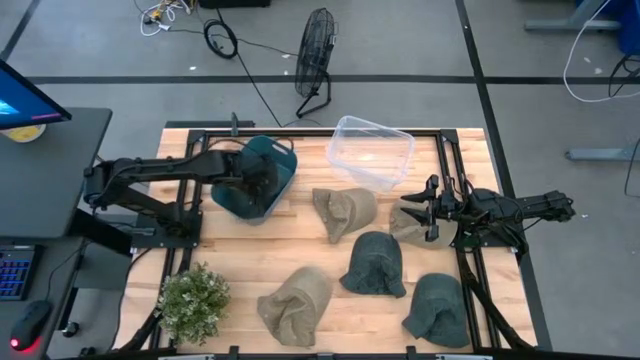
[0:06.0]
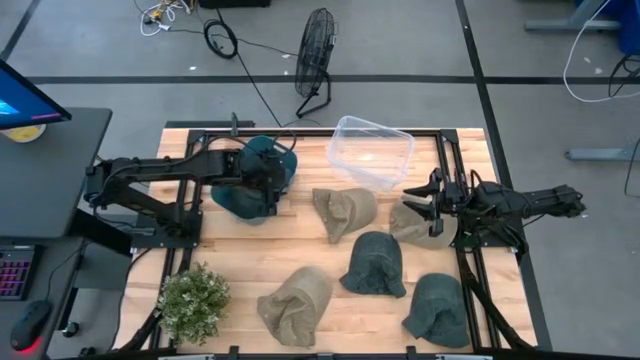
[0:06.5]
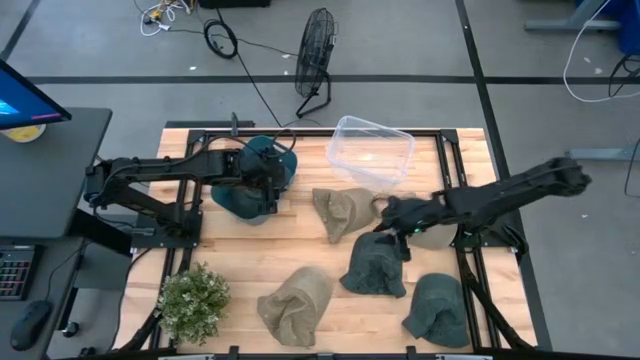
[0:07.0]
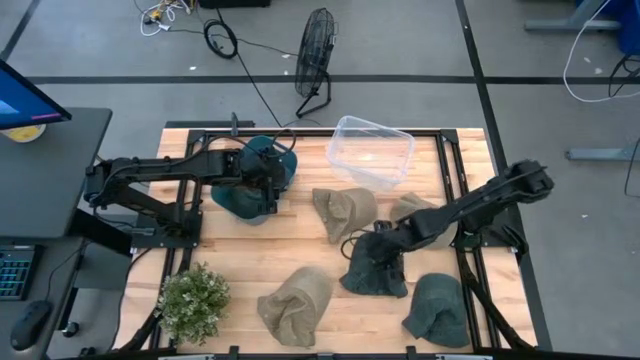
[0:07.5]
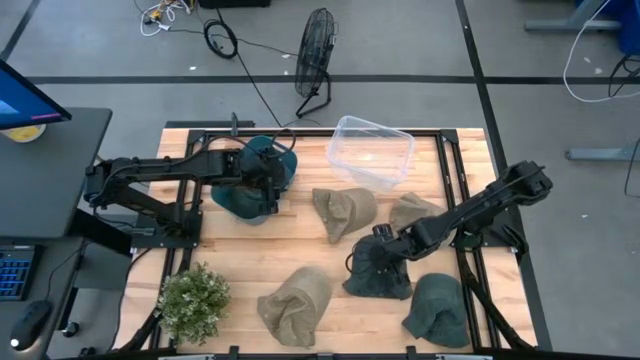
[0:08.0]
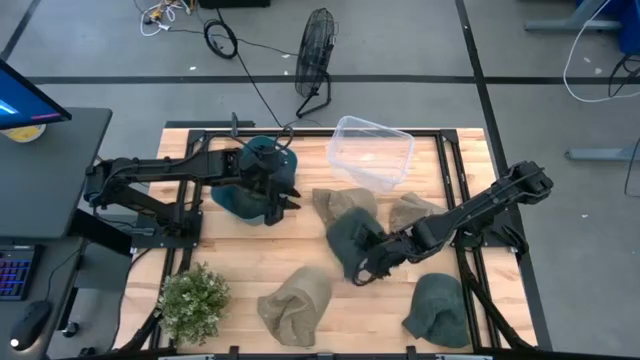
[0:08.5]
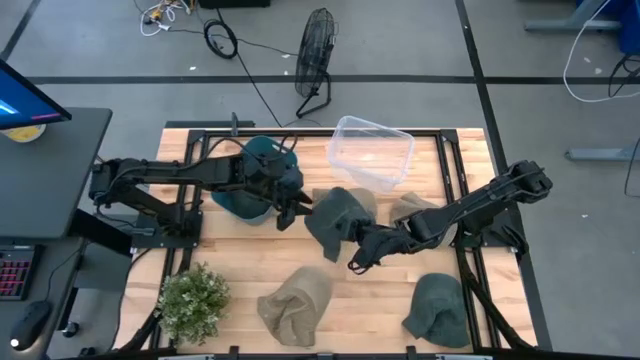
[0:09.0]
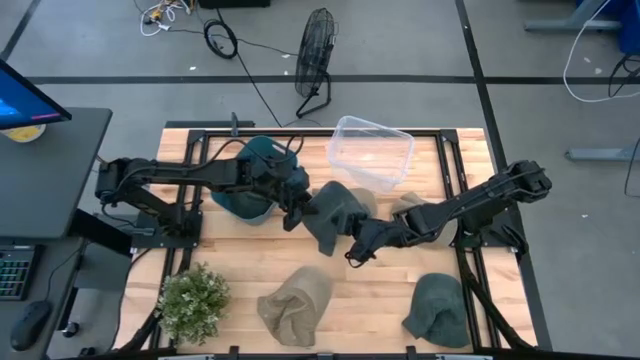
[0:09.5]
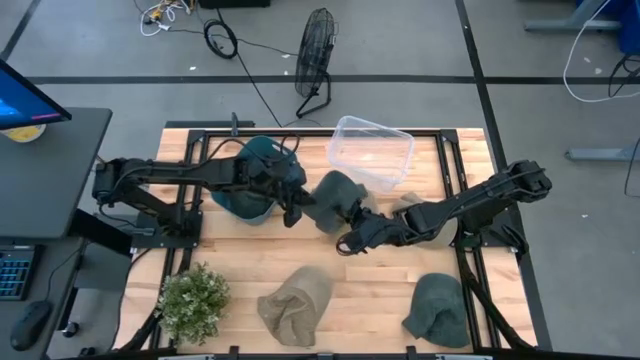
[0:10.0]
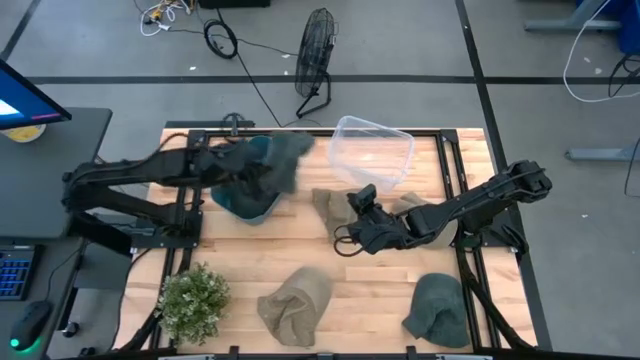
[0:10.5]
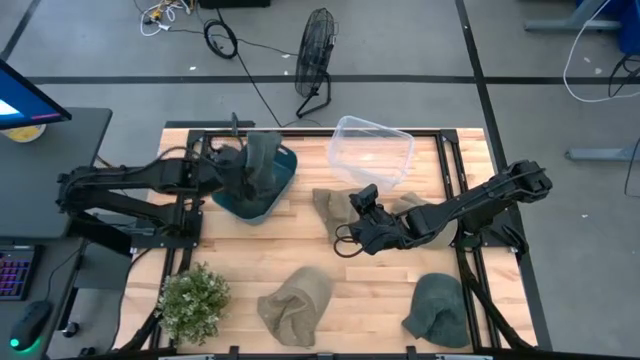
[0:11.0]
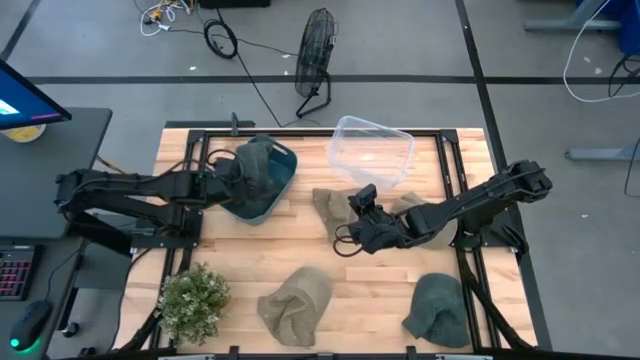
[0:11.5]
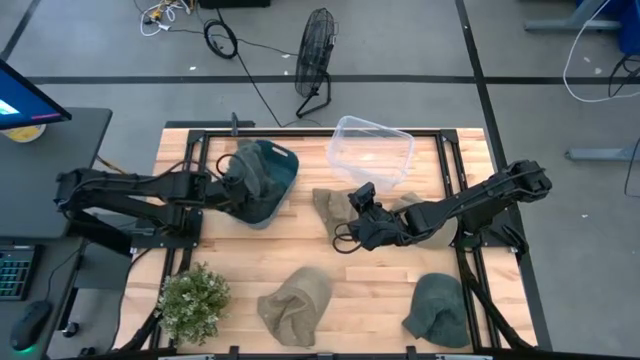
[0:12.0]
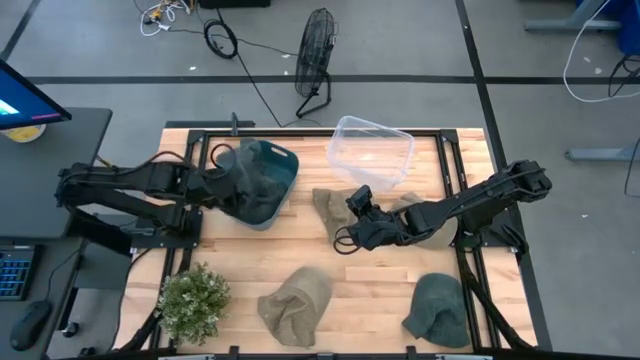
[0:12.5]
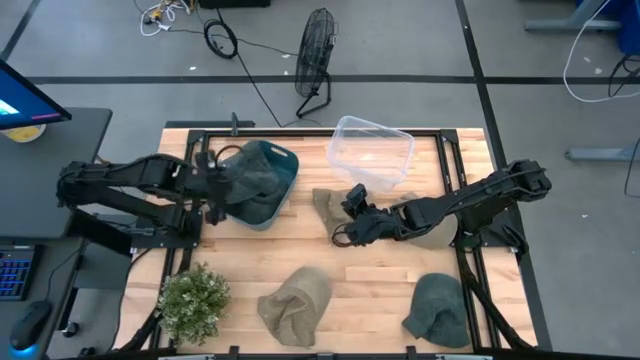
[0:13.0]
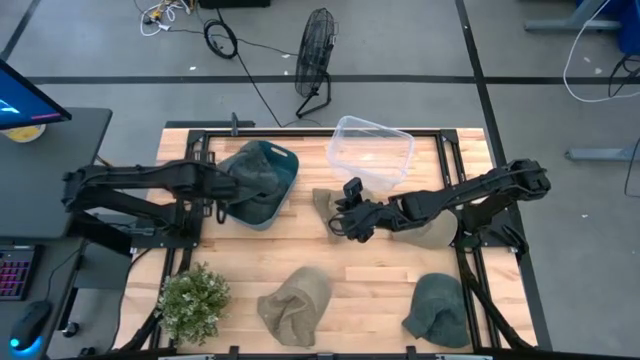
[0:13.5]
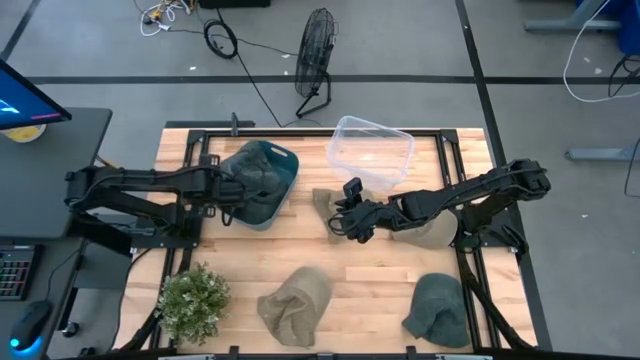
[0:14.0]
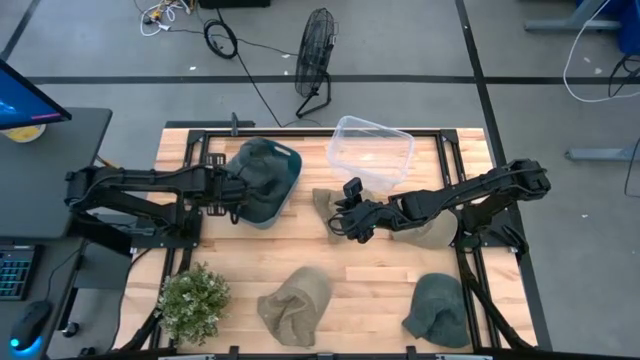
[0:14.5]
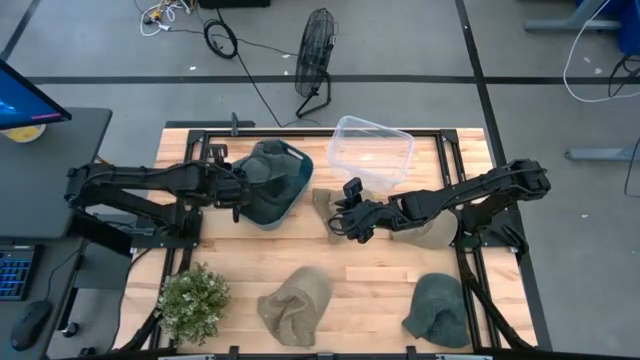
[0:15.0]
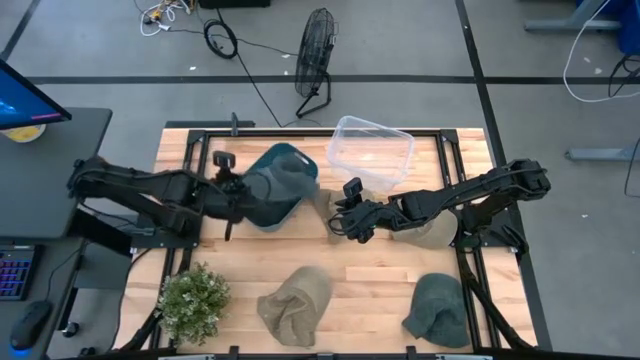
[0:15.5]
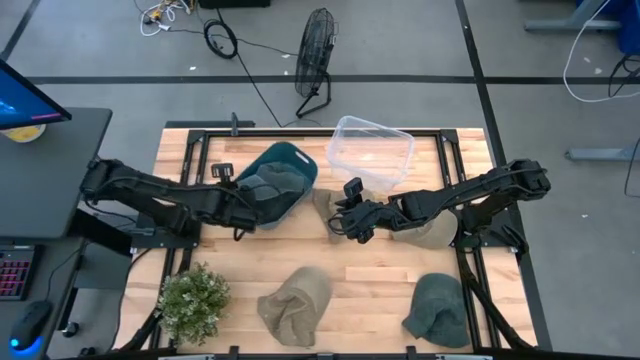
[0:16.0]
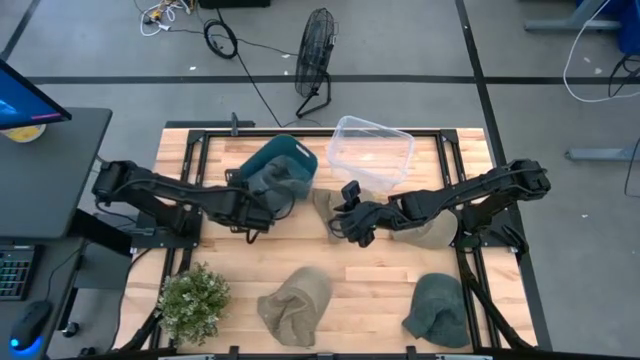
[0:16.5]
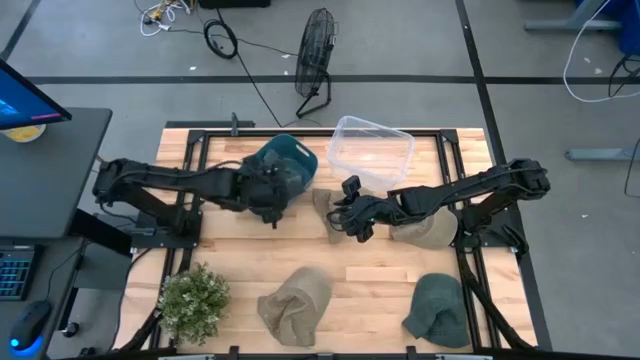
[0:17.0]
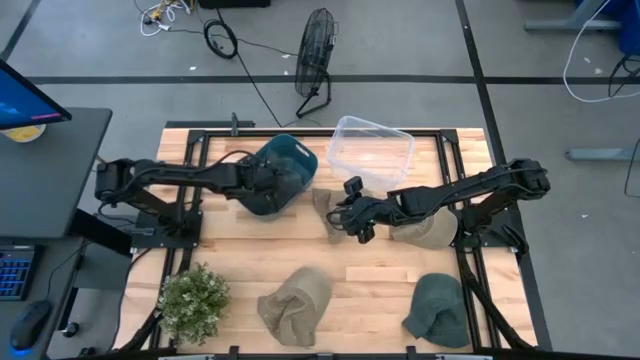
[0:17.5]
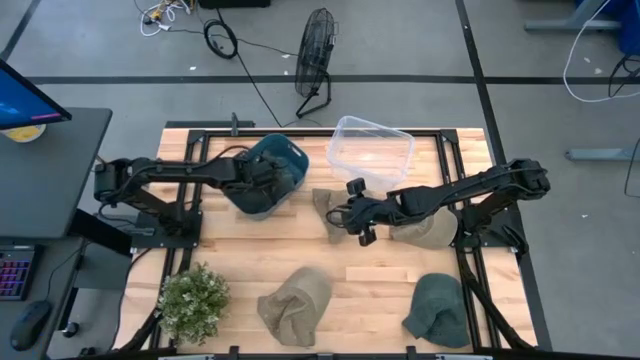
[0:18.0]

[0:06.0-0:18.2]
Task: Pick & Place hat
Put the top blue cap into the blue bin

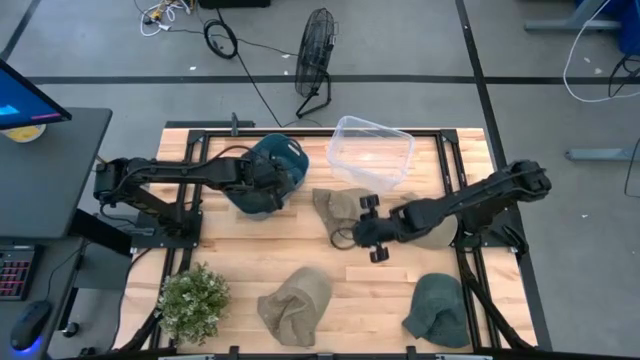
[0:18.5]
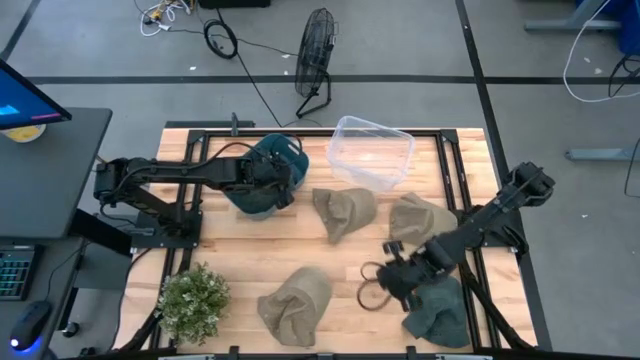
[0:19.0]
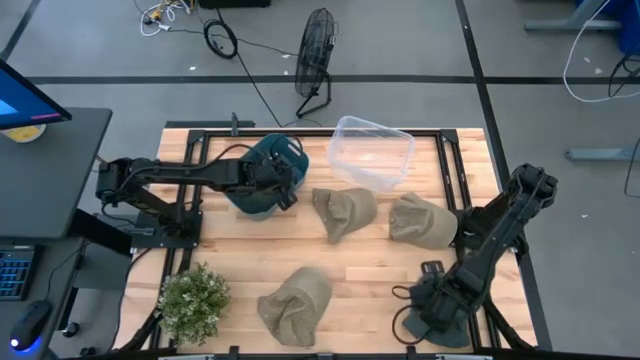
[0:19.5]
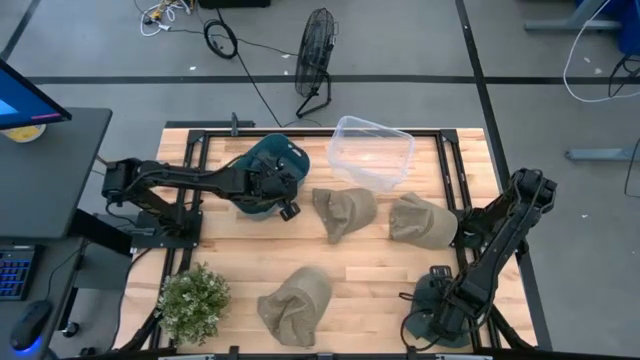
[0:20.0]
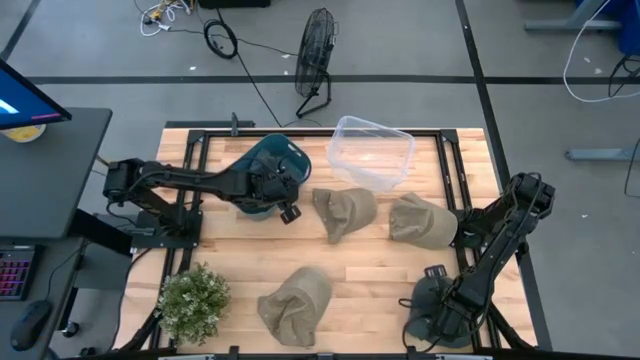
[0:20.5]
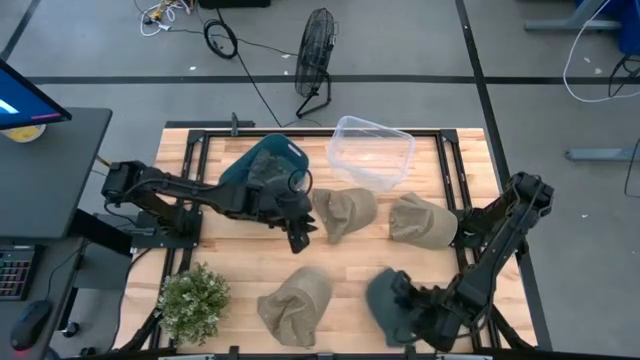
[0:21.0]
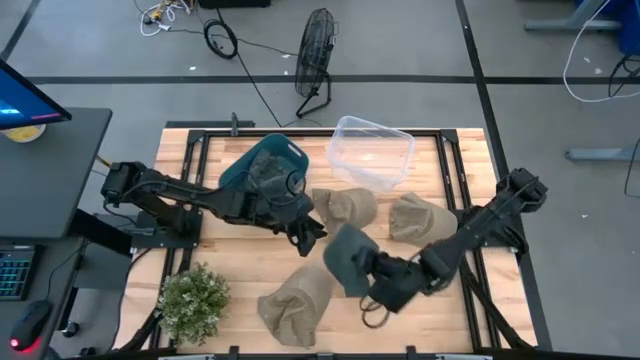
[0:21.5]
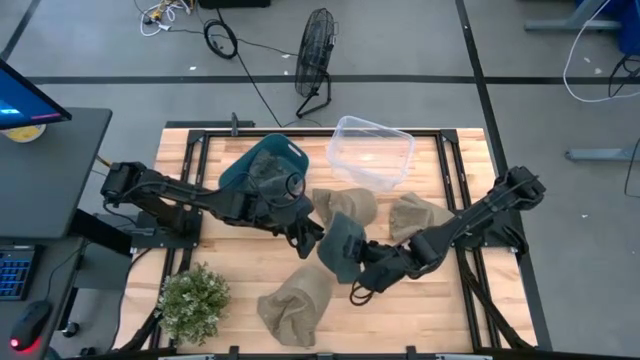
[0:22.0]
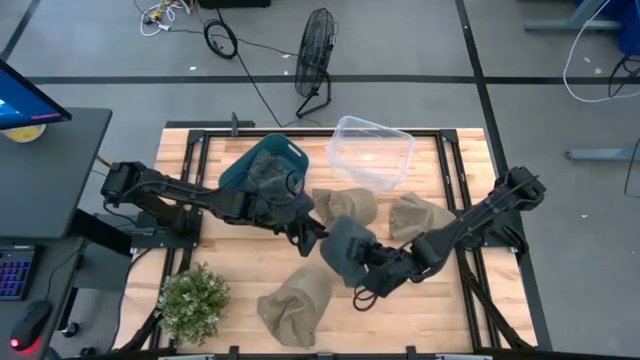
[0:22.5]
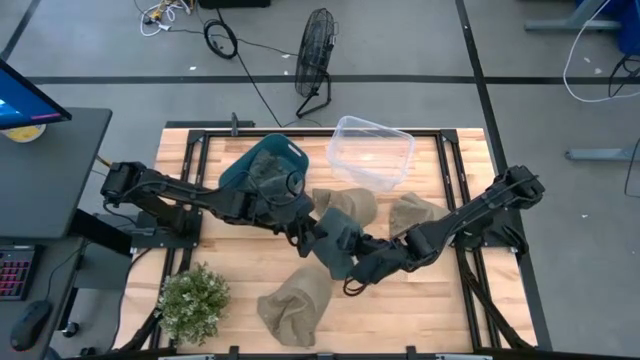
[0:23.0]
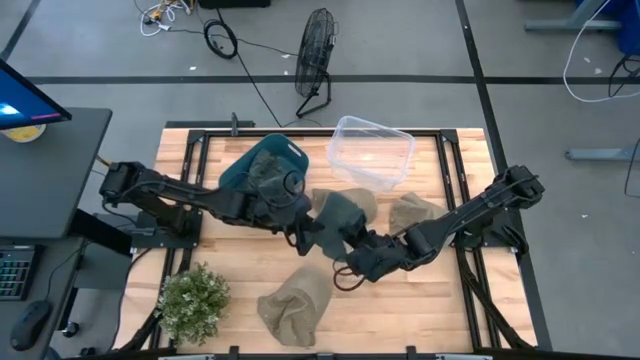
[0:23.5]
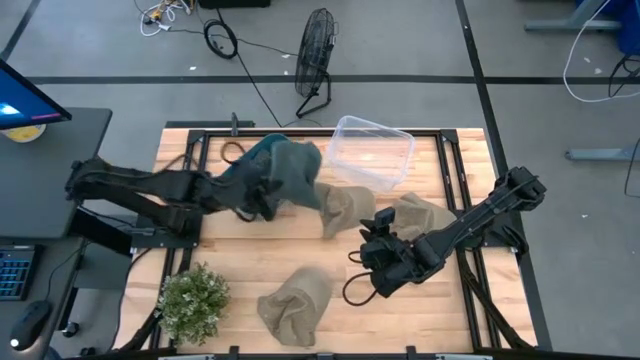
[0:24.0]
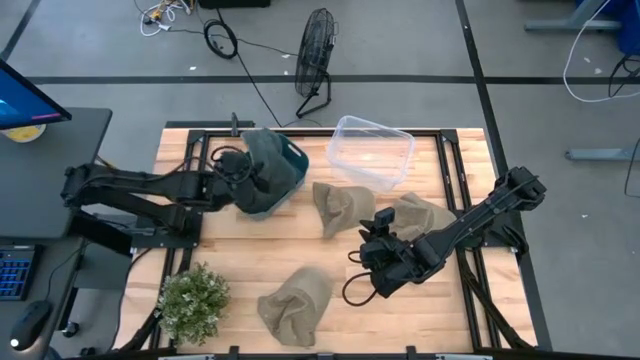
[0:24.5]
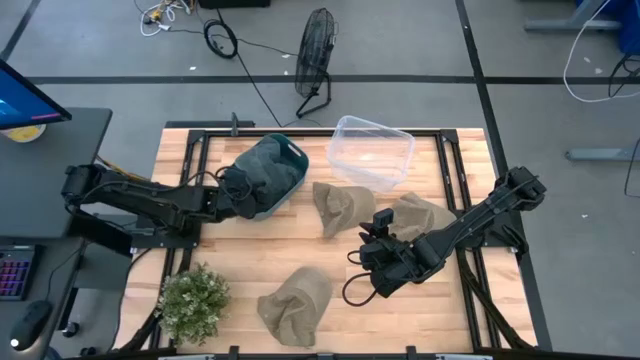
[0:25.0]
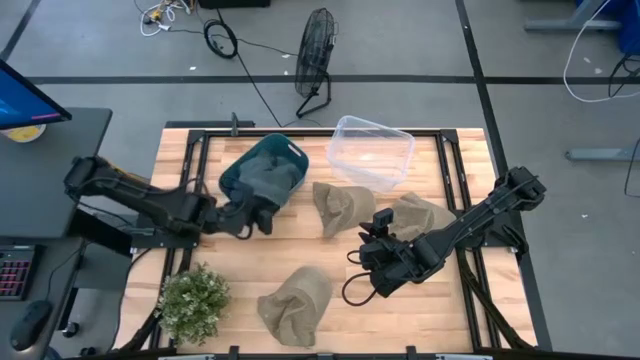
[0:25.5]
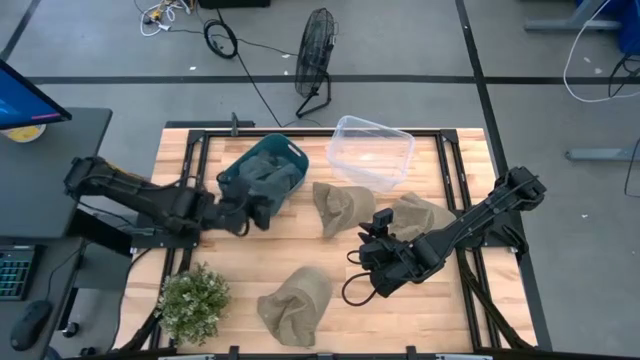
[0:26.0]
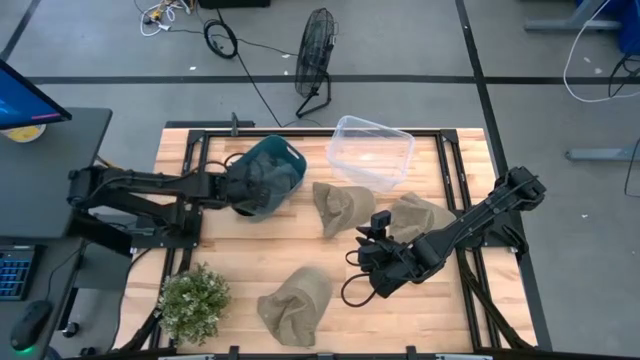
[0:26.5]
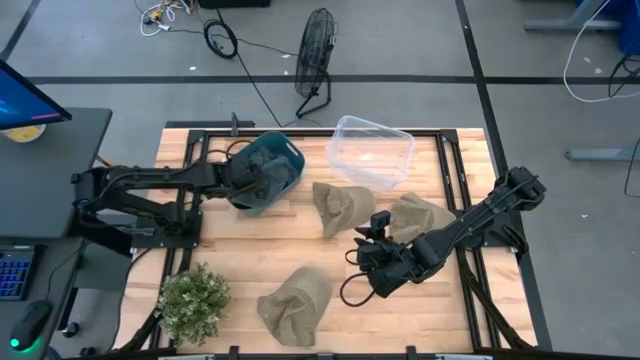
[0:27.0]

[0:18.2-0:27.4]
Put the blue cap into the blue bin
